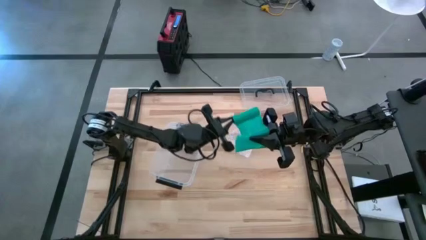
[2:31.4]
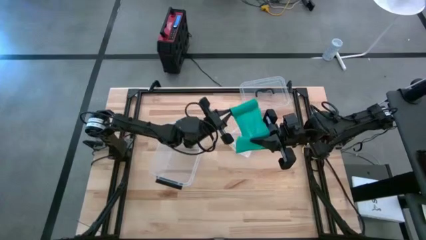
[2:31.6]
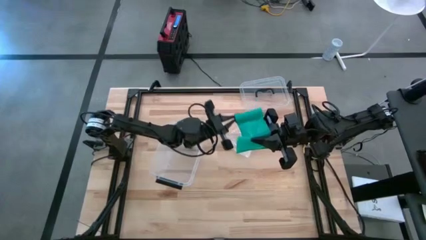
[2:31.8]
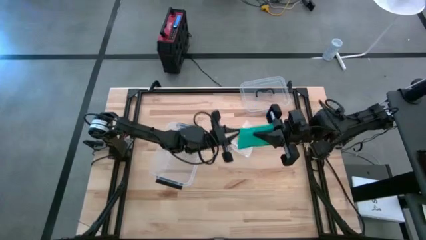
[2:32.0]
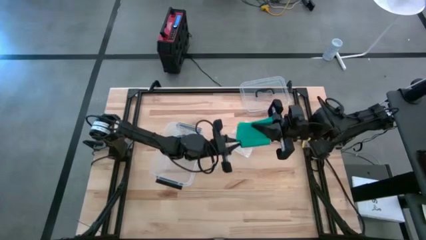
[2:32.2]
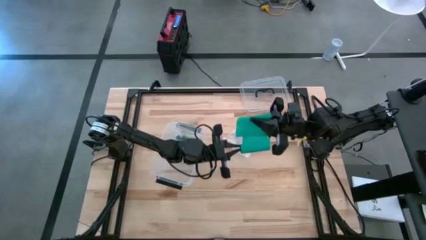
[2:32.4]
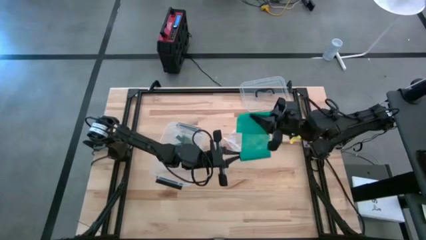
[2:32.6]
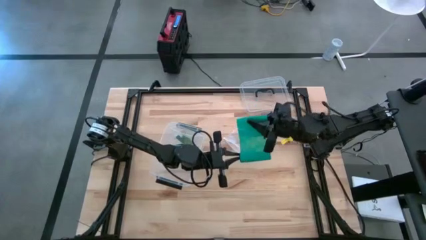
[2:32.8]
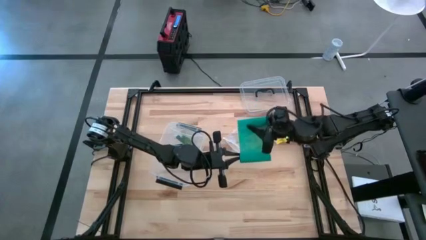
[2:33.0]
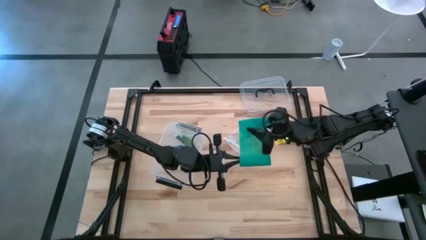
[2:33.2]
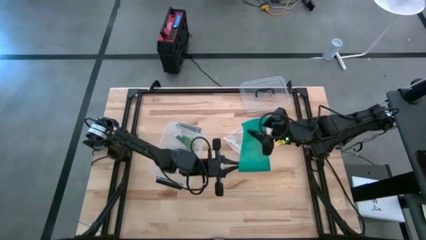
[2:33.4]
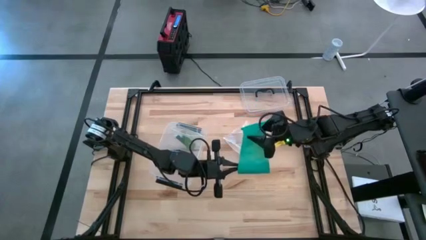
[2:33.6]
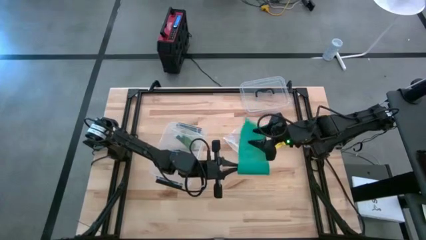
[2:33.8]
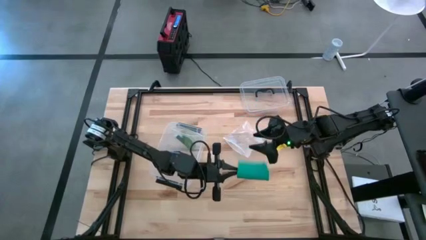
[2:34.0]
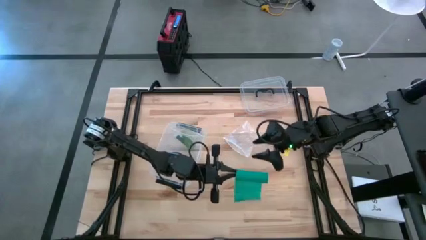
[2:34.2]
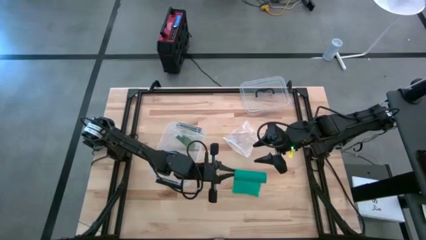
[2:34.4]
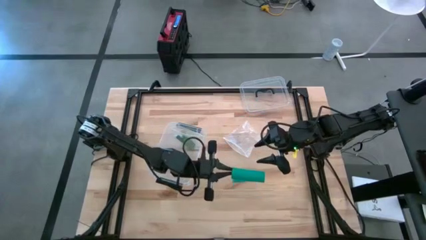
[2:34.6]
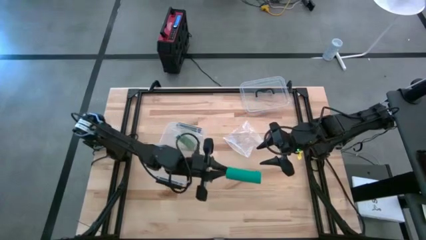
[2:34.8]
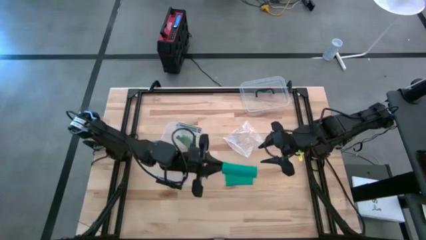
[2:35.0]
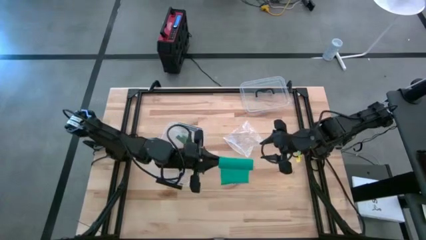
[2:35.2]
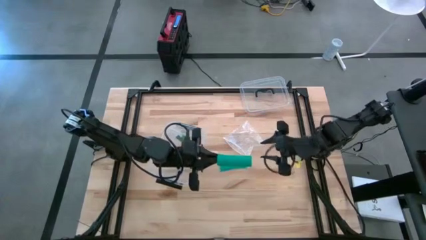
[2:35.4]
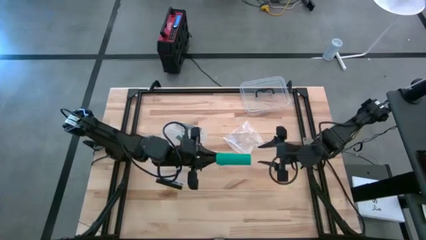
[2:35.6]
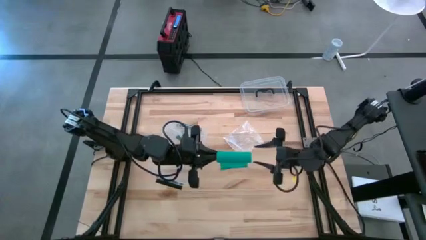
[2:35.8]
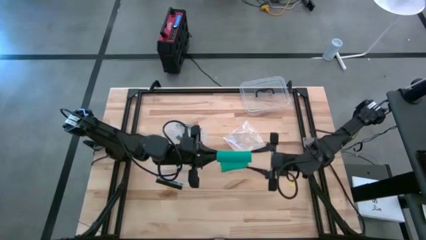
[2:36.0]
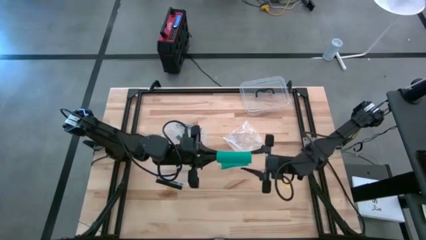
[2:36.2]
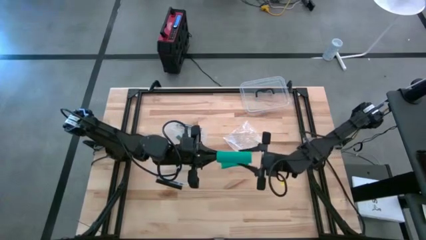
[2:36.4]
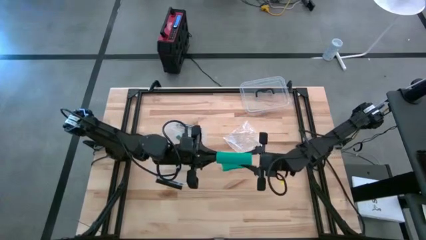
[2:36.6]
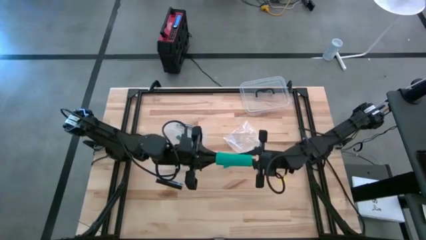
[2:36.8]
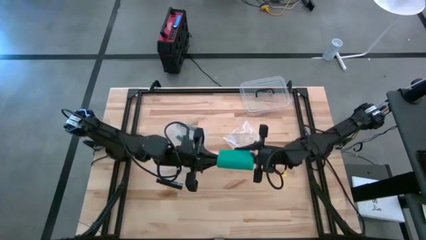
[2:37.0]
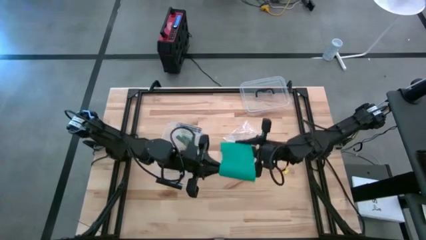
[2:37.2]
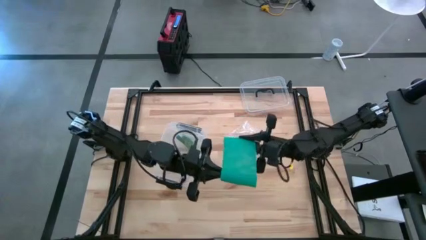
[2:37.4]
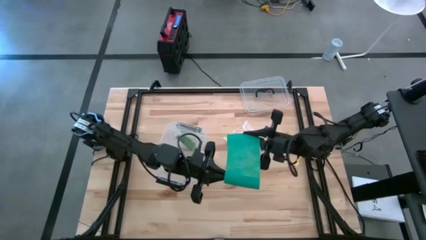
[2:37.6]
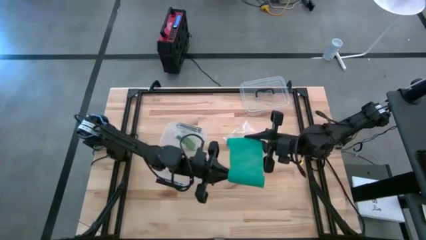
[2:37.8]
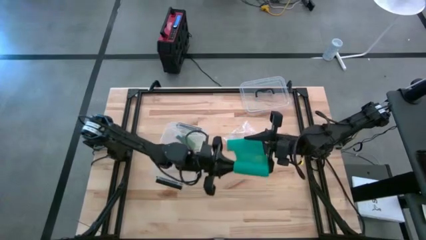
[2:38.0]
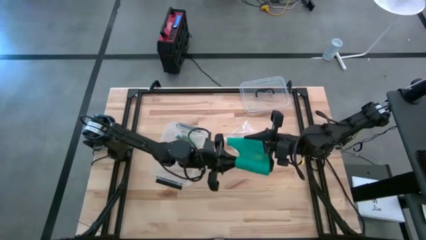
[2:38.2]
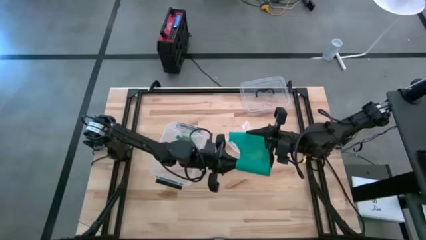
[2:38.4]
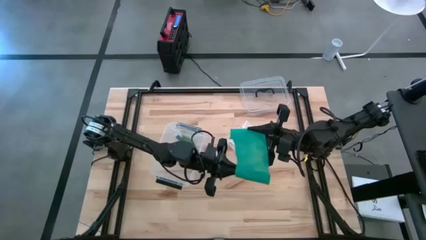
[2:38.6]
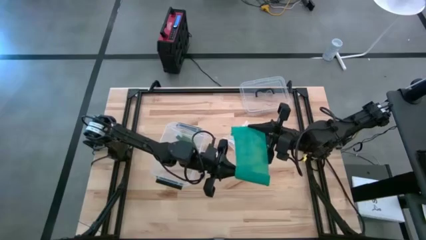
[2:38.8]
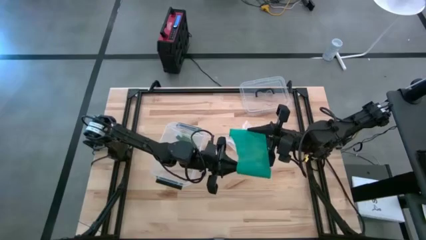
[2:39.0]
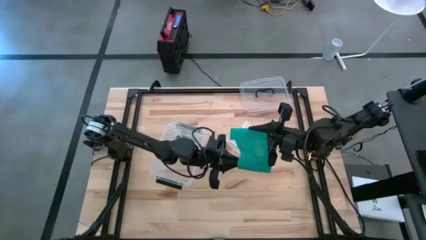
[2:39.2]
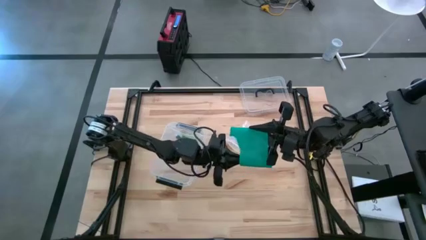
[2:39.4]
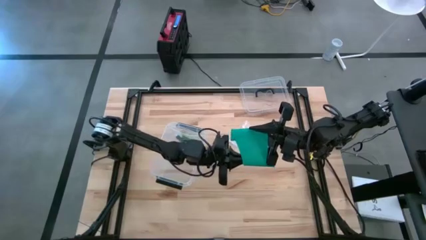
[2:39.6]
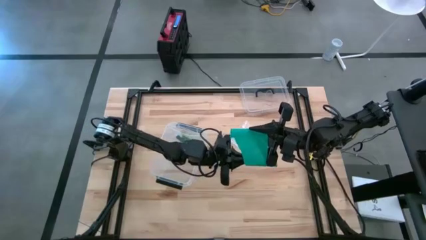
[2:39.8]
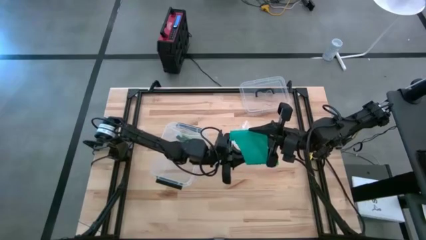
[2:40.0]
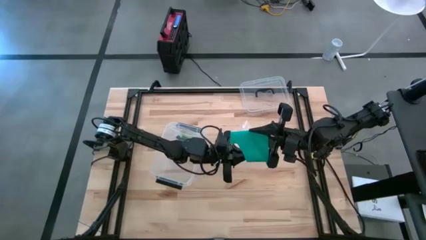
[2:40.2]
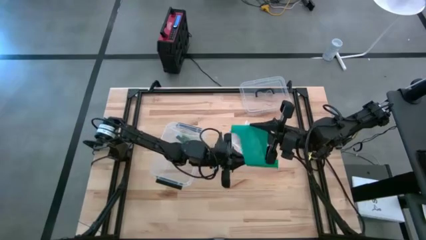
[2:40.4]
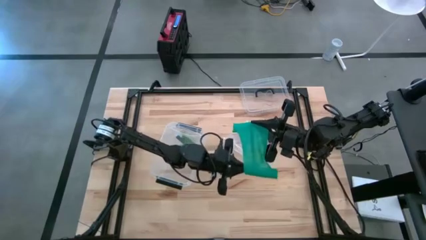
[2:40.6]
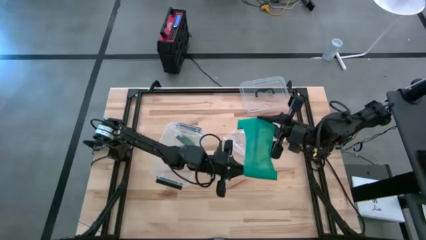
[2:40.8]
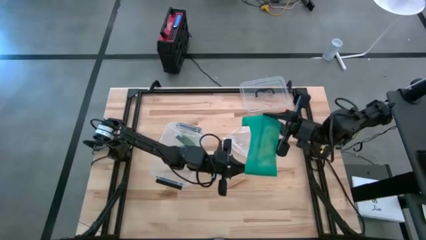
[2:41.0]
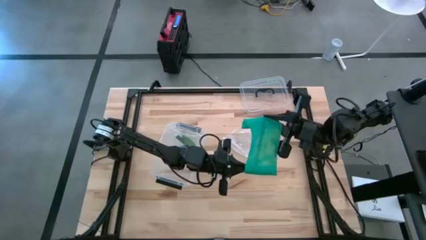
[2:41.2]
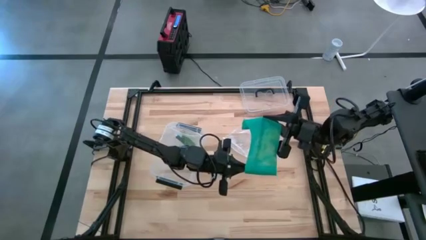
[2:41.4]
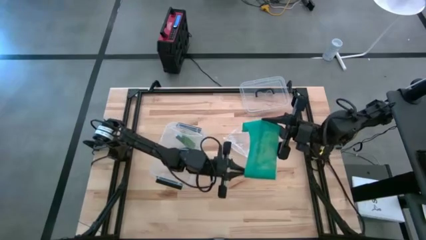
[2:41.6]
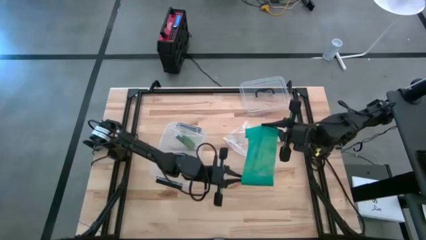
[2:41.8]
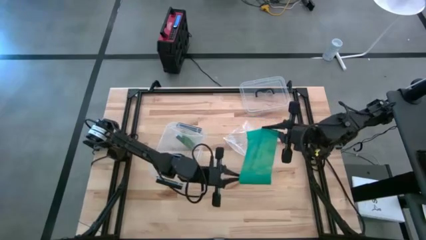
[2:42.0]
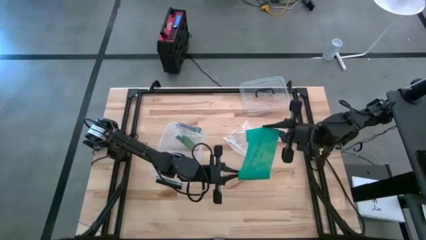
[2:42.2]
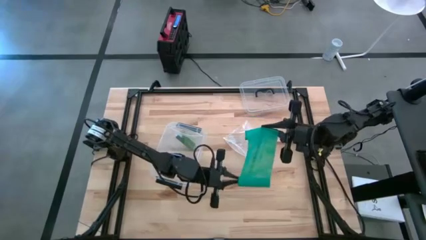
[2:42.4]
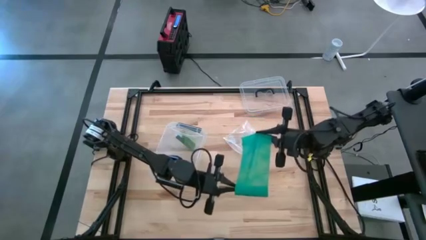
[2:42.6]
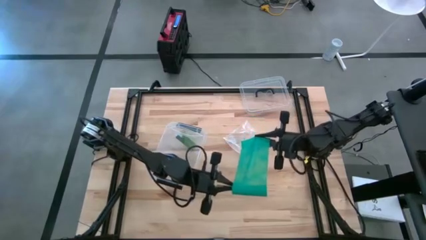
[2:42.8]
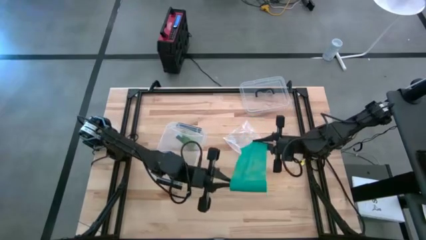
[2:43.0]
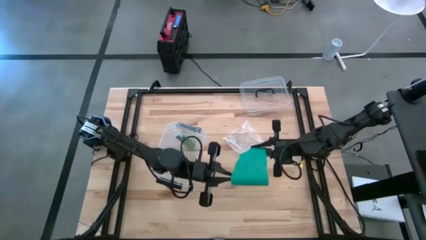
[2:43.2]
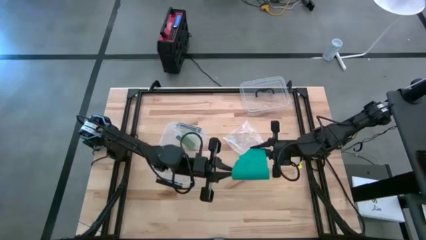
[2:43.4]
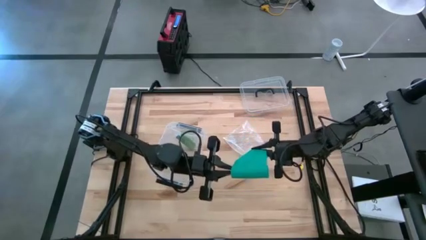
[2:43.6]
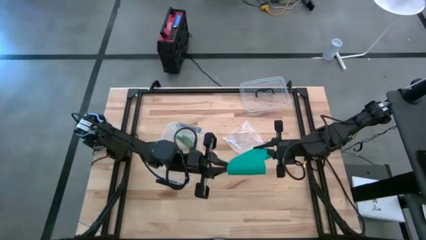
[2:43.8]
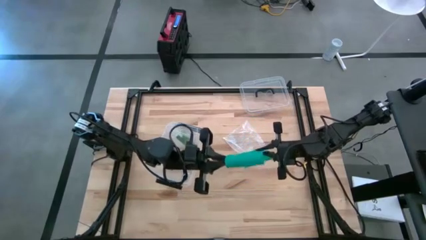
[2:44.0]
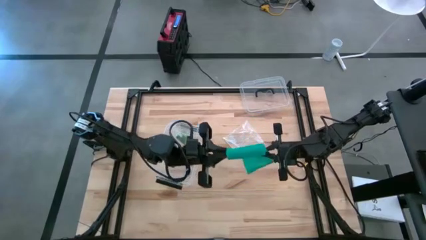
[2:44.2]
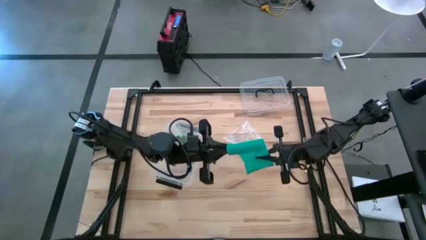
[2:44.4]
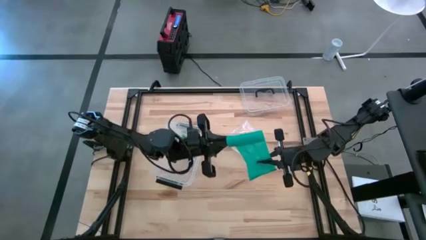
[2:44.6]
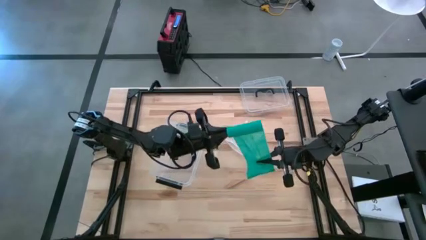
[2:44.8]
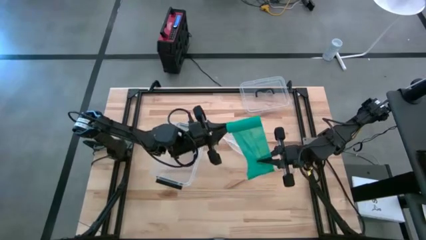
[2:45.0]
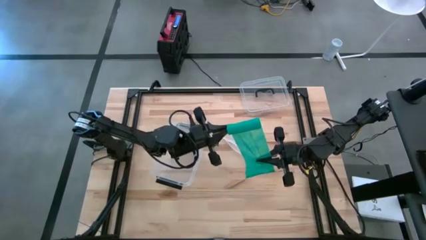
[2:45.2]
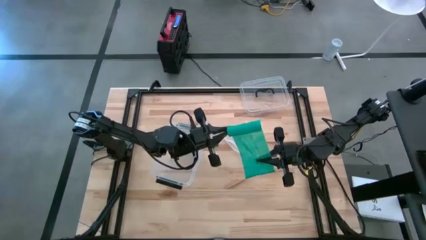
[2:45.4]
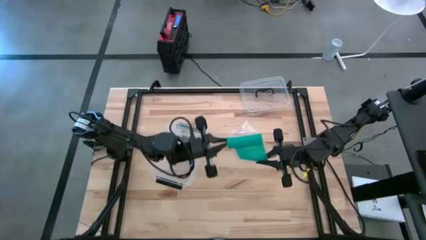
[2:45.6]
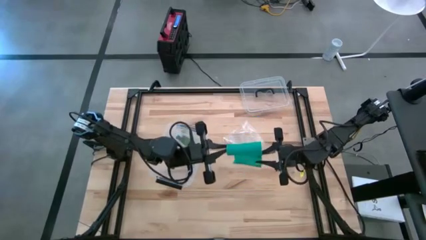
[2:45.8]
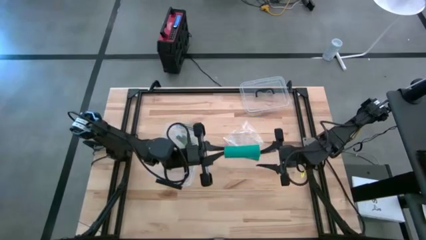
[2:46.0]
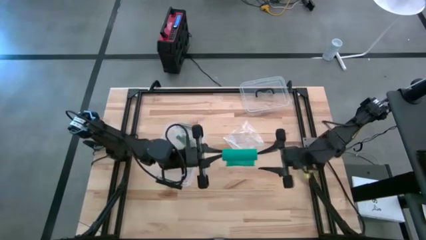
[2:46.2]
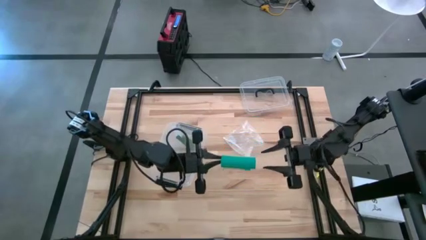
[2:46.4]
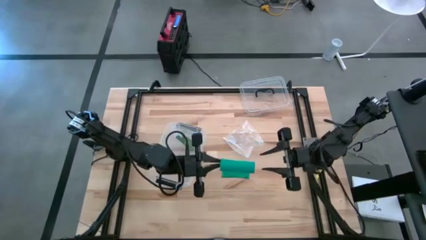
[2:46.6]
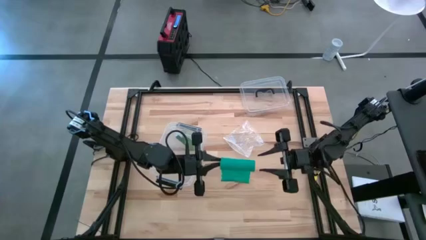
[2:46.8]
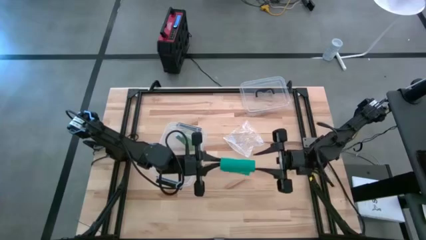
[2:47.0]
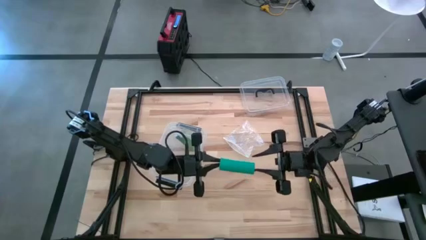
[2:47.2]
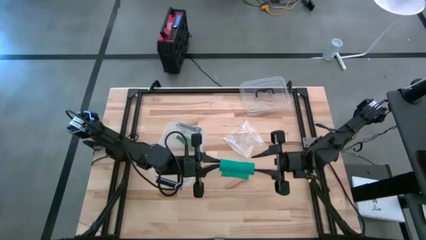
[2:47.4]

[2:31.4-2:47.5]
Task: Roll bandage
Roll the blue bandage
